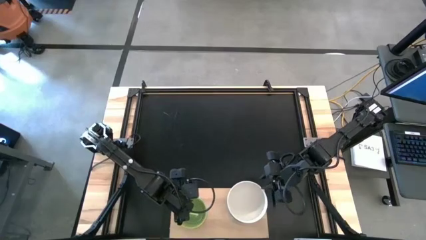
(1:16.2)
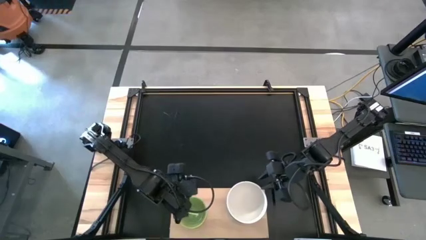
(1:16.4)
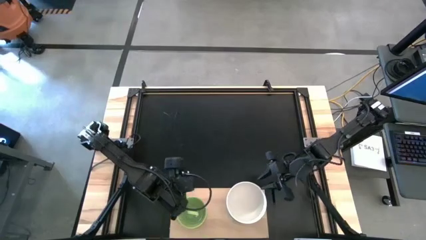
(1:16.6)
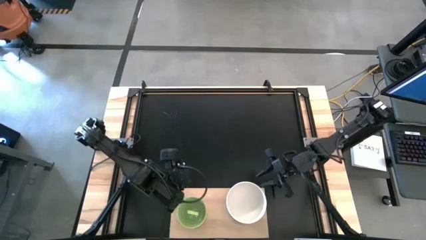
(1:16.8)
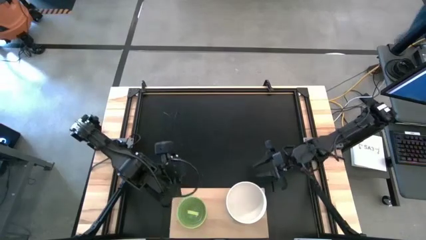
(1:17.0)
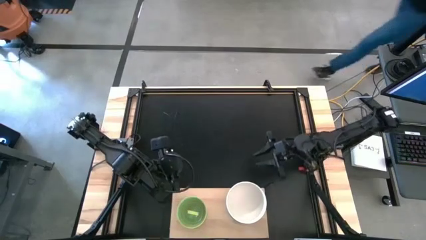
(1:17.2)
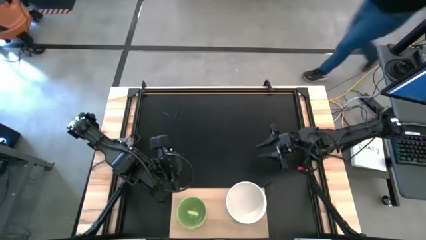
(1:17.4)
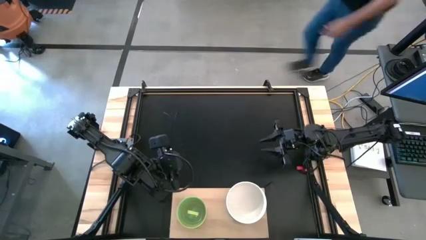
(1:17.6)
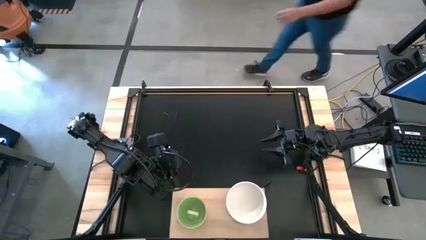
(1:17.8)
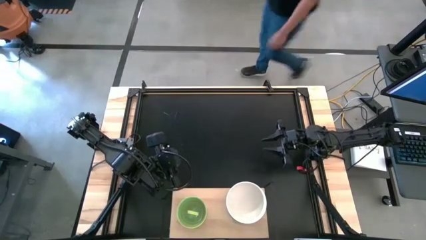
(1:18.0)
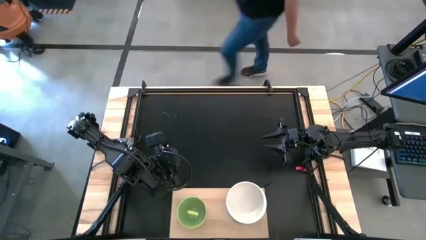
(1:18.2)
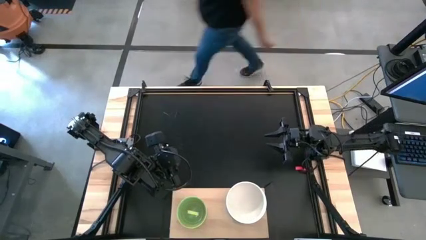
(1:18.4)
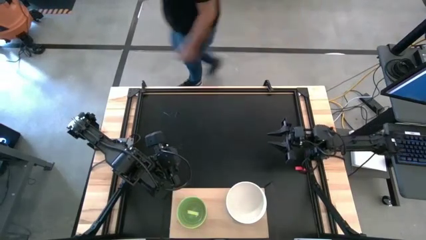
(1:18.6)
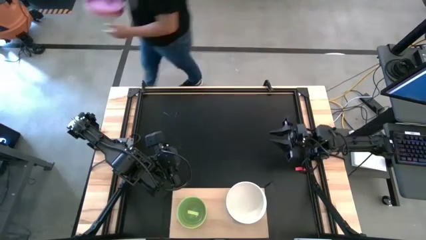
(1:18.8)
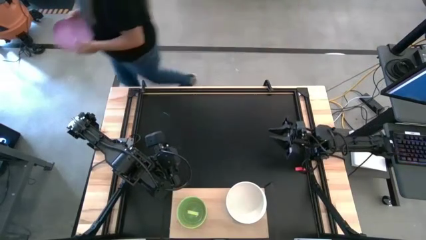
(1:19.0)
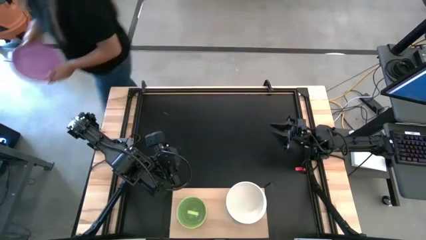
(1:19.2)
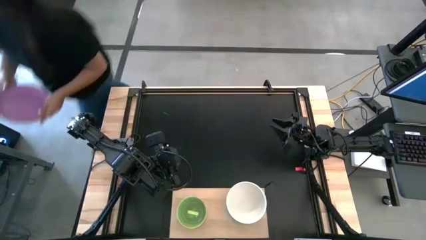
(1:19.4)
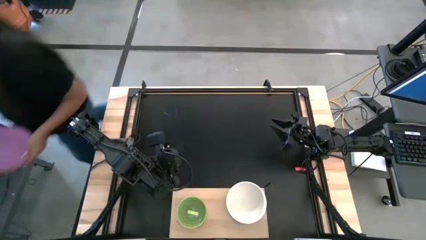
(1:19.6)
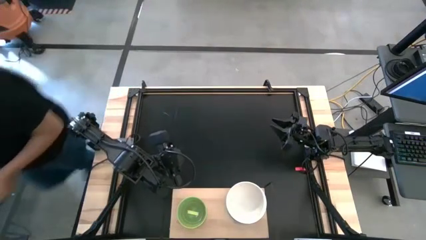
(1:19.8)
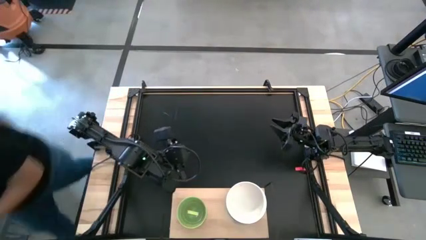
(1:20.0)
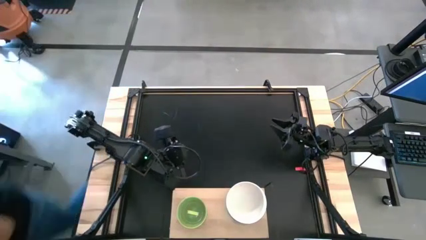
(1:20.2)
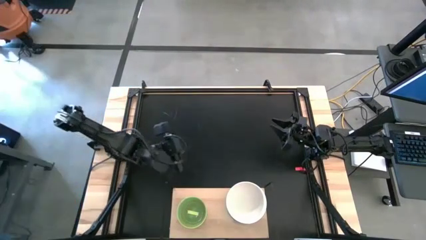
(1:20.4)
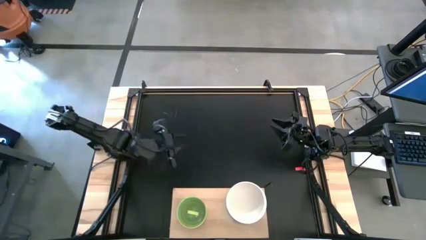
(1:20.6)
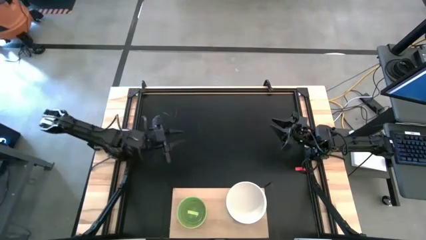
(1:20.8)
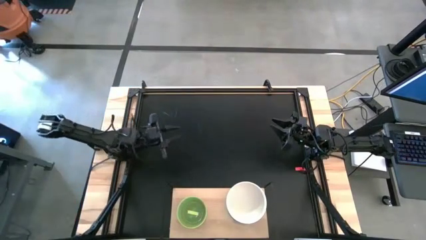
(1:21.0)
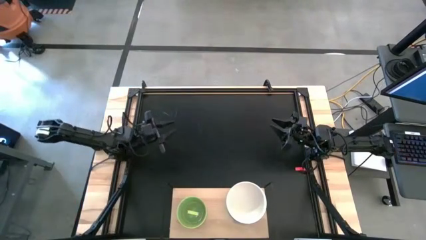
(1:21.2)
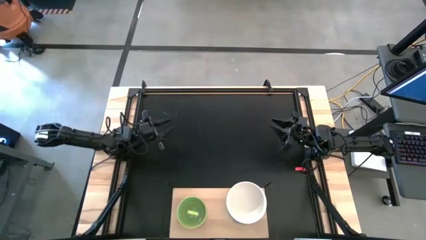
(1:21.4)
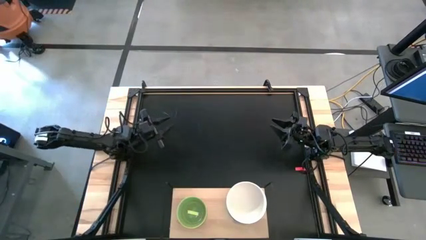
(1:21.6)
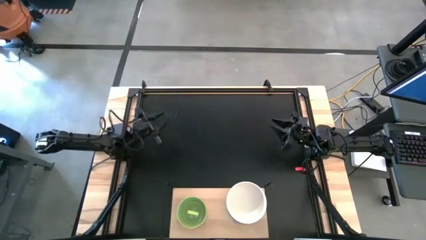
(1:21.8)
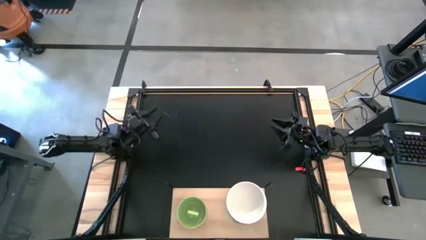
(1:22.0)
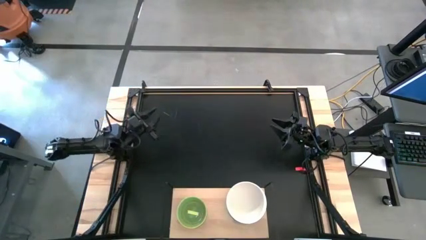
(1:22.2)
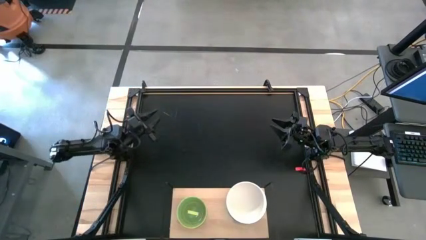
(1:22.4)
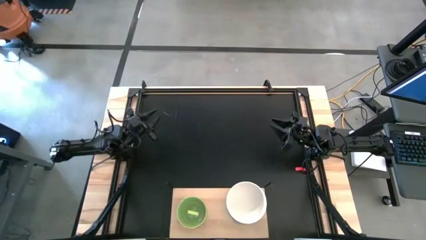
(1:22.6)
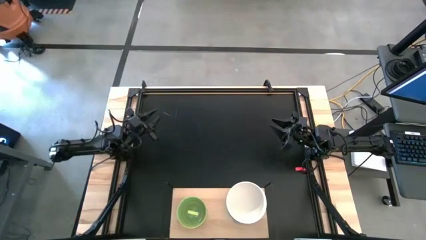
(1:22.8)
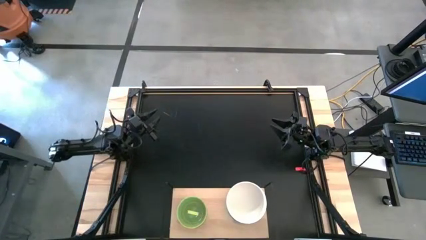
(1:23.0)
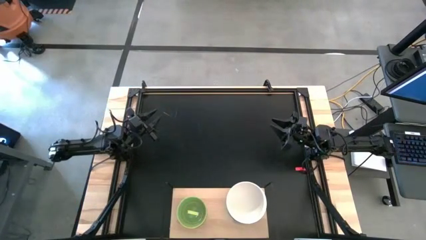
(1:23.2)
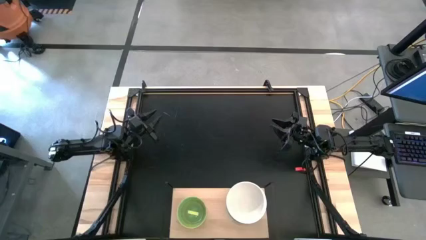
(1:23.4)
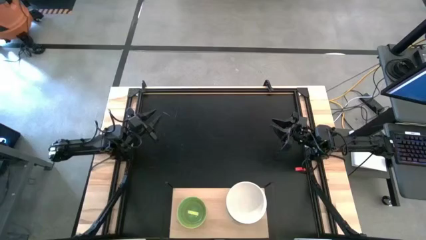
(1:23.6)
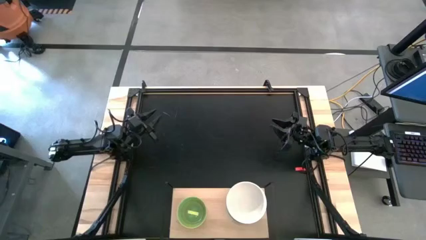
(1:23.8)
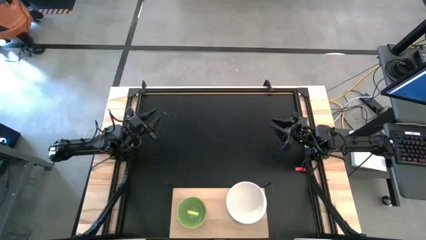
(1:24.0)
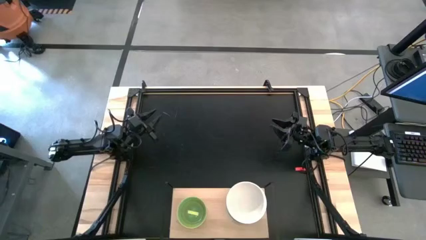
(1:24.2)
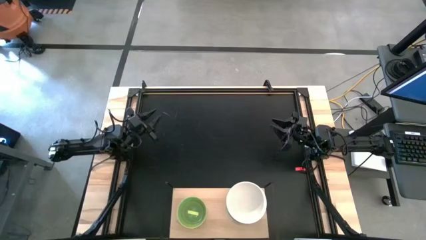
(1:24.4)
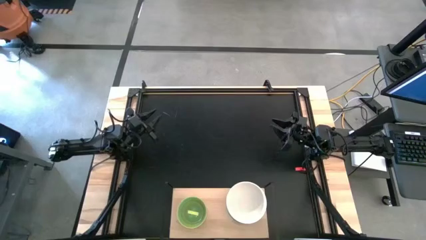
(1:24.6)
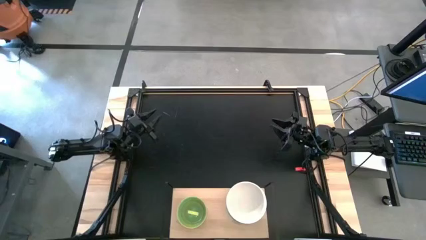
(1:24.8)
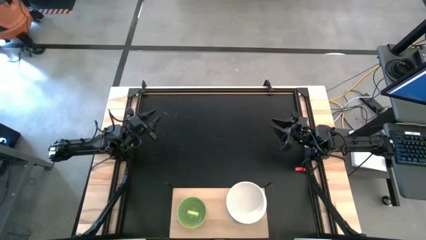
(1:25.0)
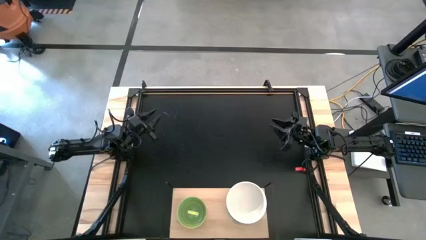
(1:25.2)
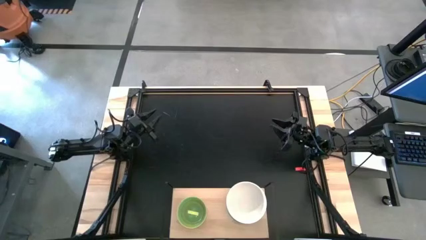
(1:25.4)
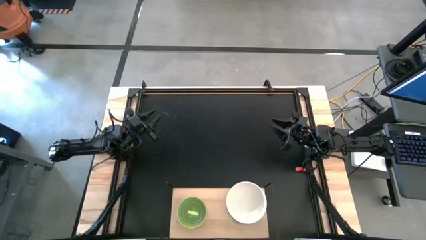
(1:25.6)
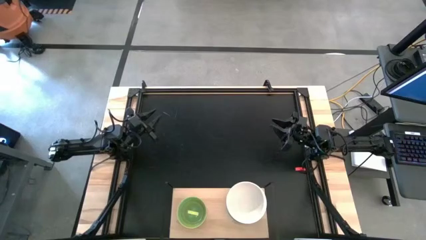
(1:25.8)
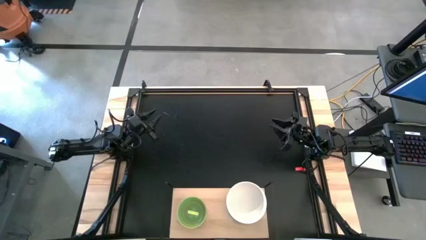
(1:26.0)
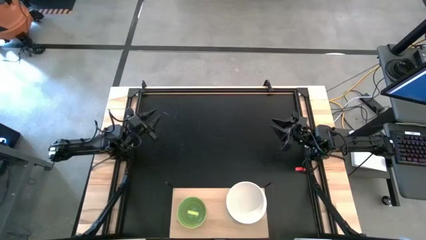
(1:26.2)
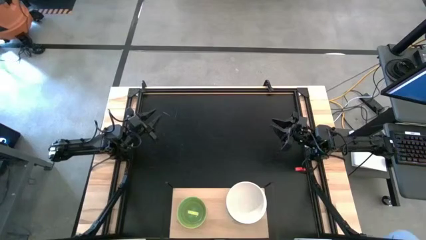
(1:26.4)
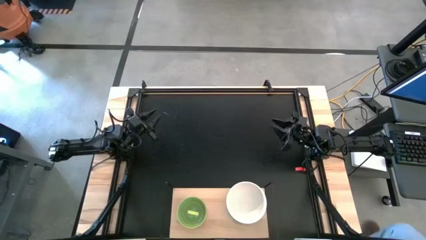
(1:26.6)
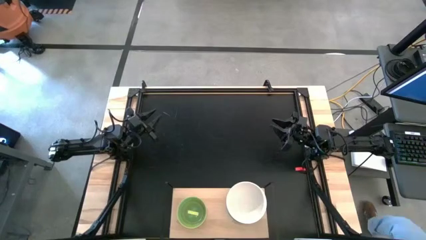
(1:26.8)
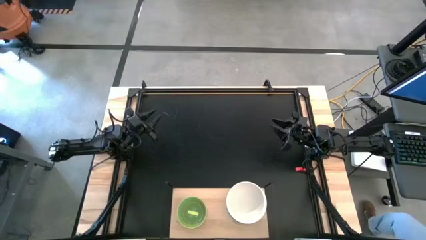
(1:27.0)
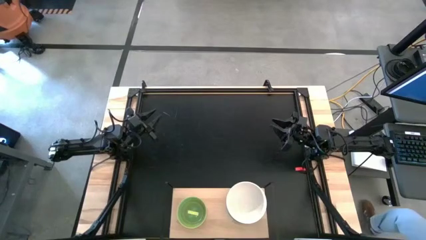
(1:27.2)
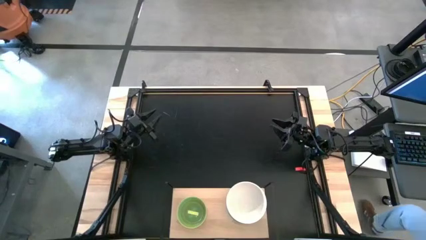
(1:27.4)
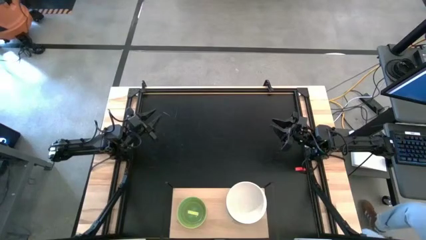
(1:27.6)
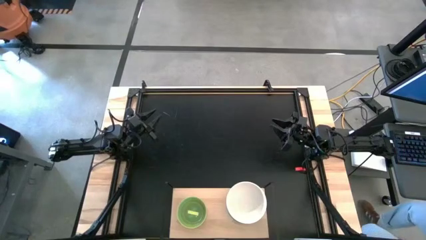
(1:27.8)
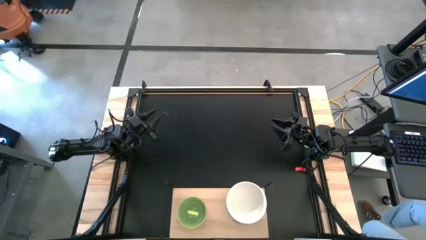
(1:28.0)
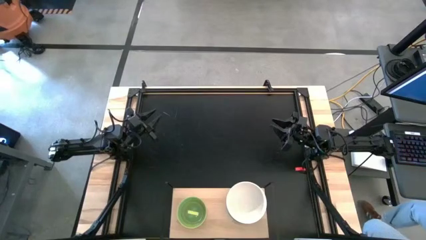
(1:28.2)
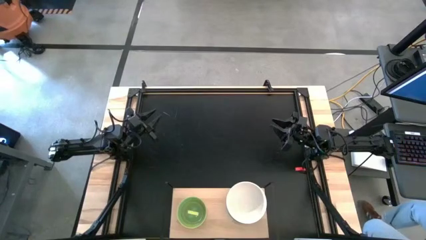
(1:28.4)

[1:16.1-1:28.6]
Task: Place and stack bowls onto a shelf
Return to Home Position

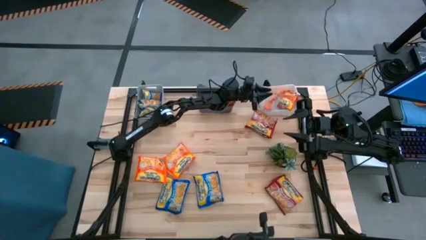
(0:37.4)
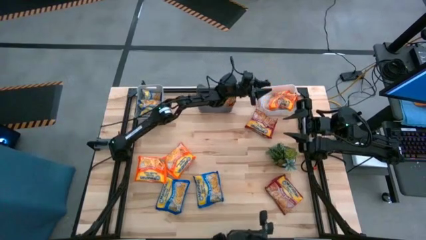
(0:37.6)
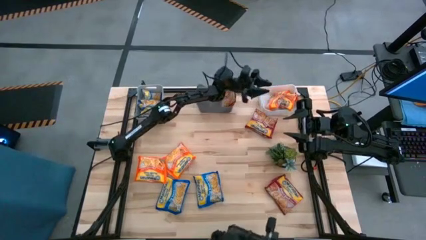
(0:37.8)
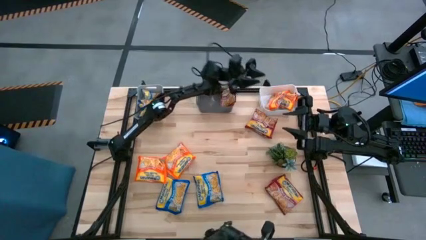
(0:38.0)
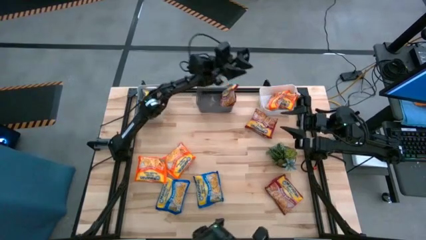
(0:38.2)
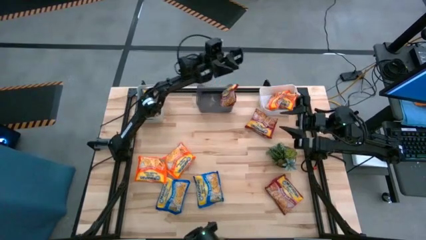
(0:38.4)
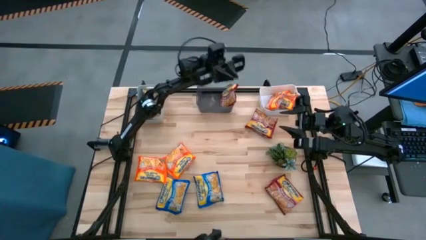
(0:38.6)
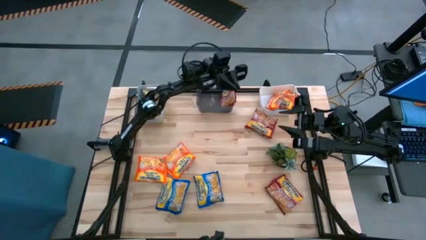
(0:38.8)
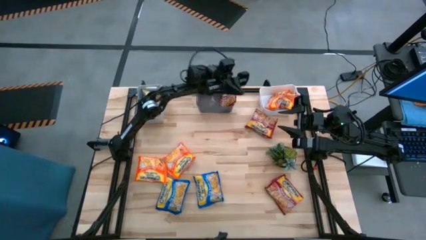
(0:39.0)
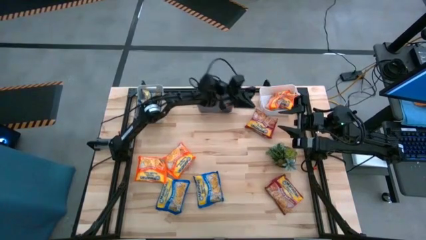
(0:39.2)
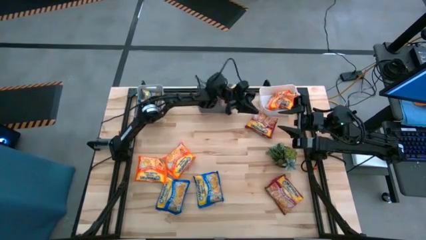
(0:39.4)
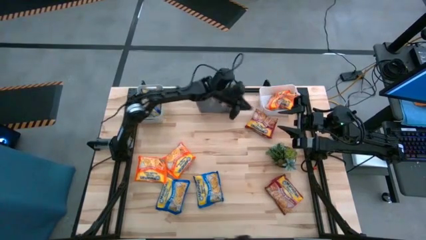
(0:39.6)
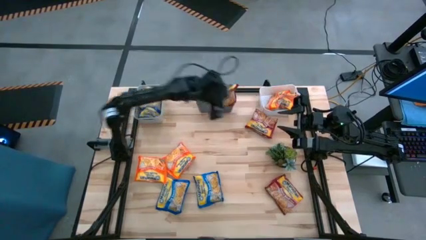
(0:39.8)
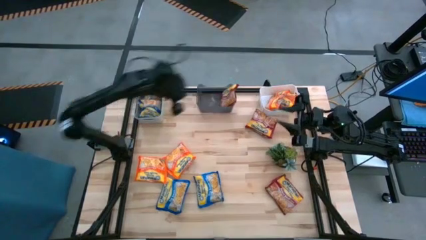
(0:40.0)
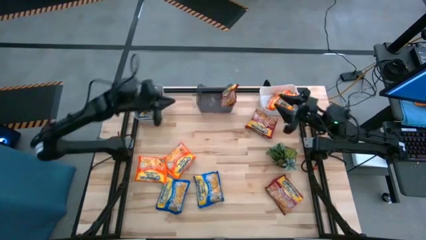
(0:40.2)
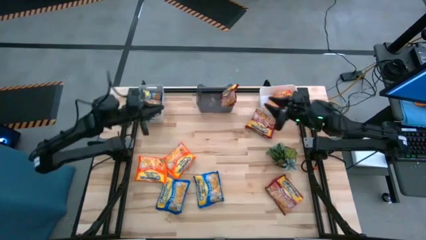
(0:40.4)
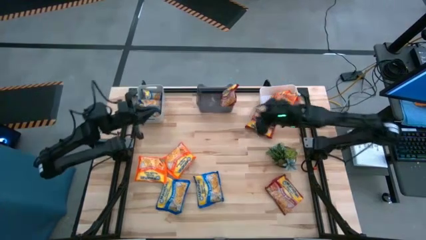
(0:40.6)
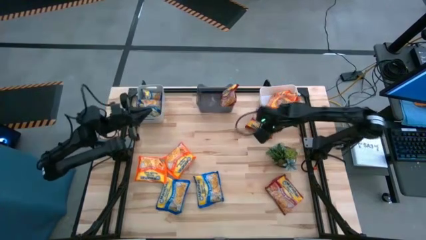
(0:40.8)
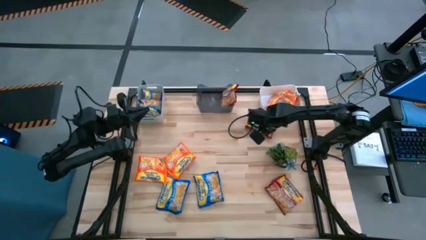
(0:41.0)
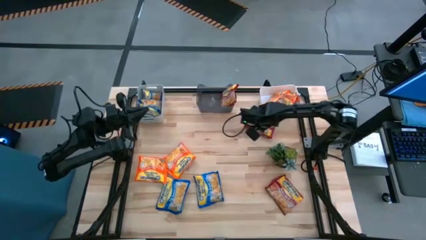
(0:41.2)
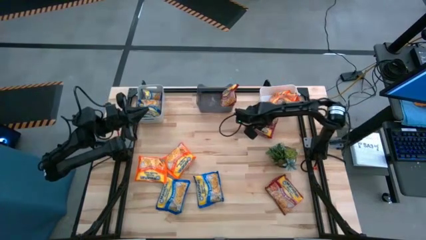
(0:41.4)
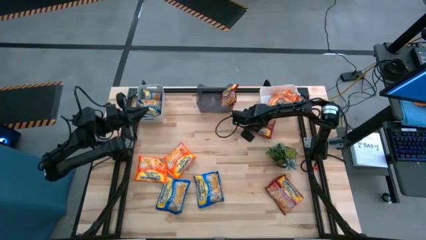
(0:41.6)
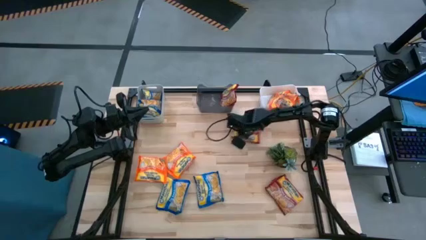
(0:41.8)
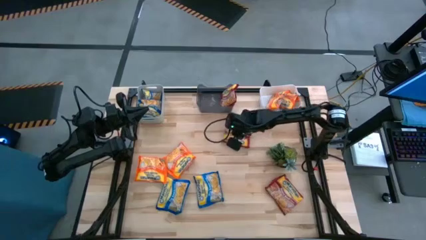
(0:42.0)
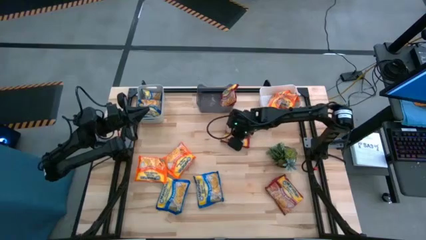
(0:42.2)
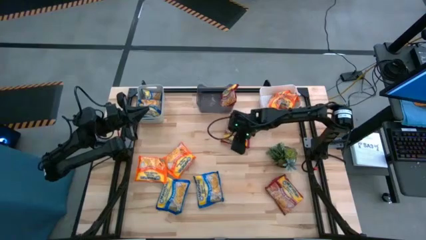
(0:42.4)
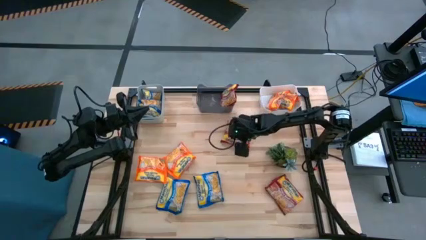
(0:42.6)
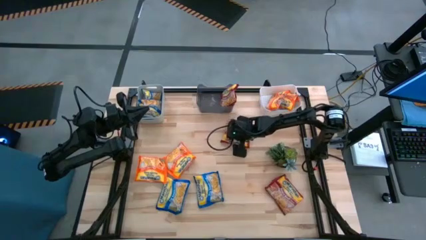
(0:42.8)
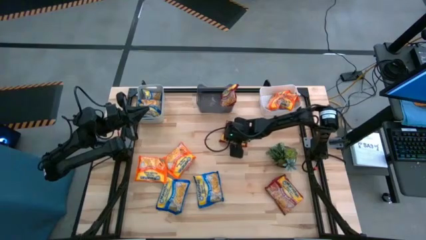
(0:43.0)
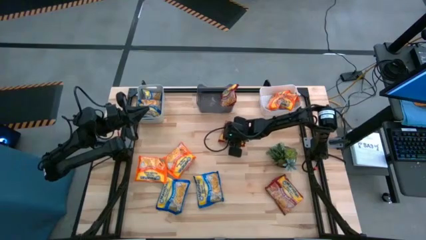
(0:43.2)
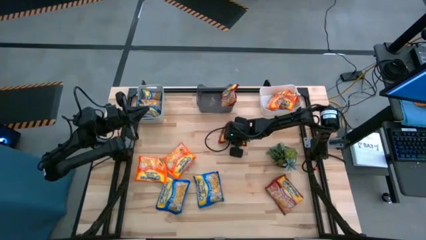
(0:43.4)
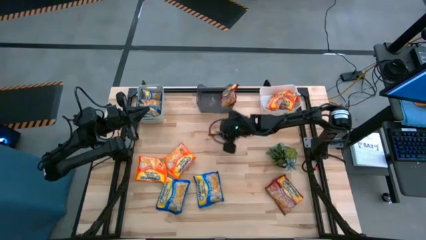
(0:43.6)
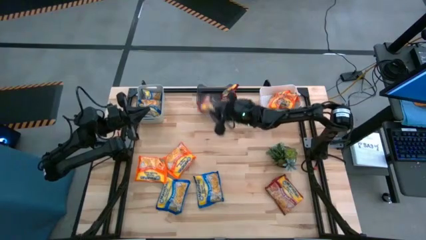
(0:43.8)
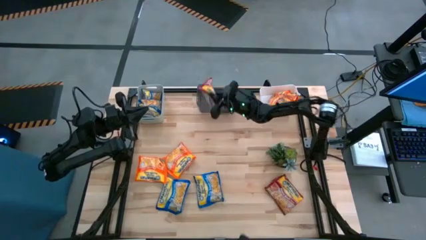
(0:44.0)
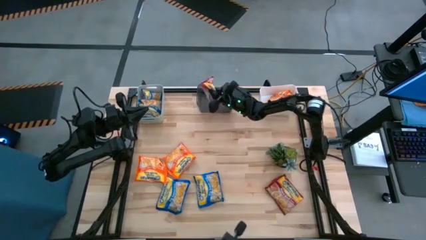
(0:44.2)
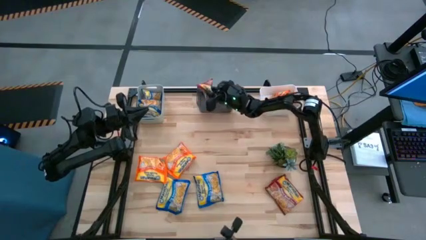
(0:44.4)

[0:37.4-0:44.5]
Task: Sort Maruchan noodles
Put the red noodle pack into the black bin
